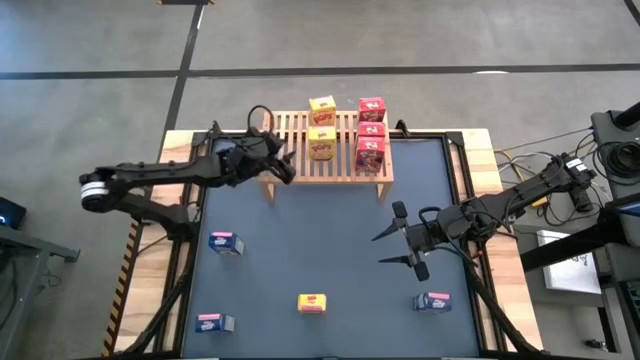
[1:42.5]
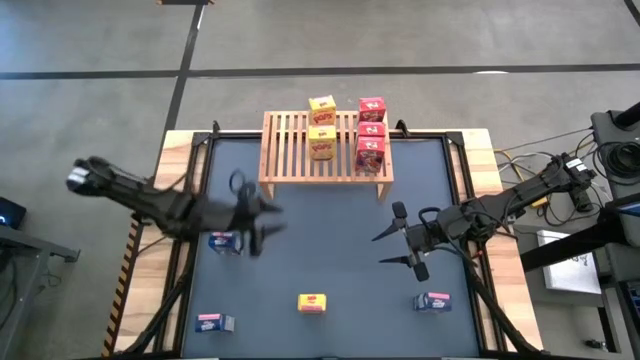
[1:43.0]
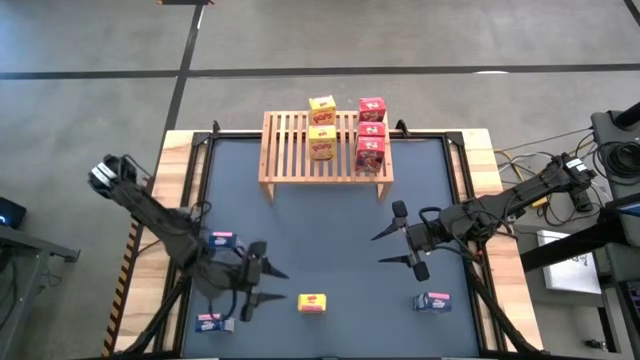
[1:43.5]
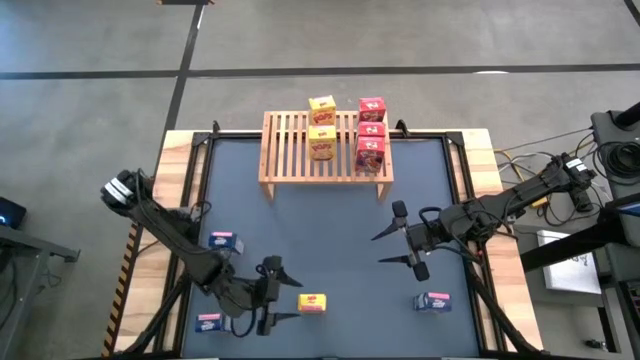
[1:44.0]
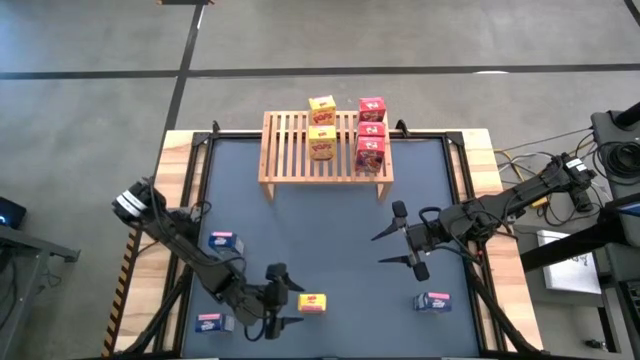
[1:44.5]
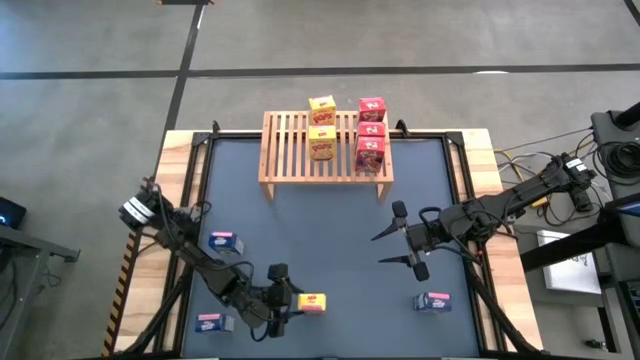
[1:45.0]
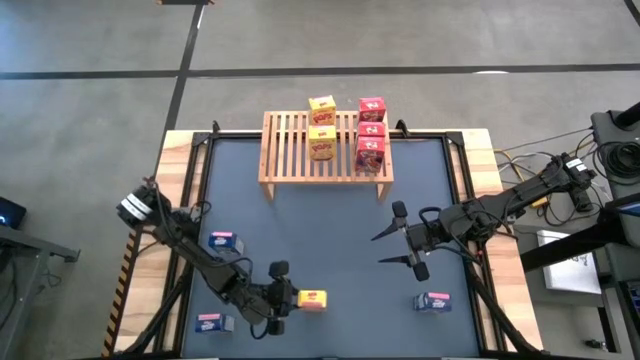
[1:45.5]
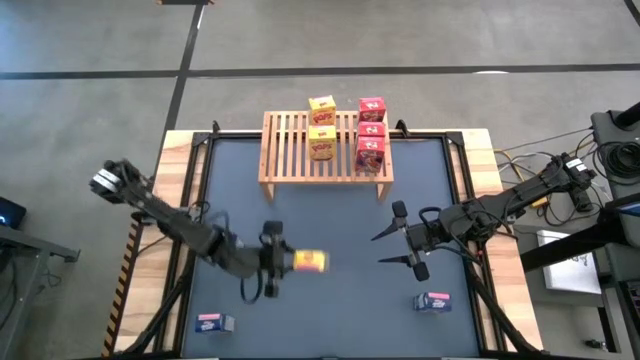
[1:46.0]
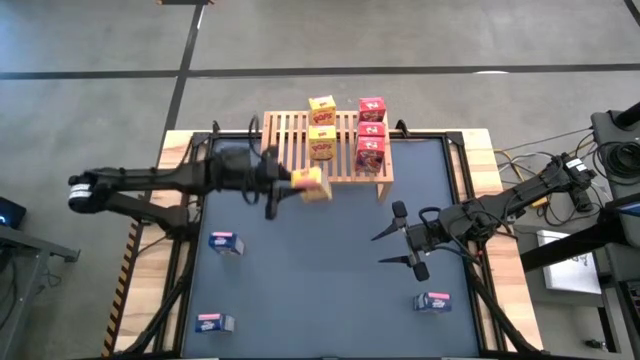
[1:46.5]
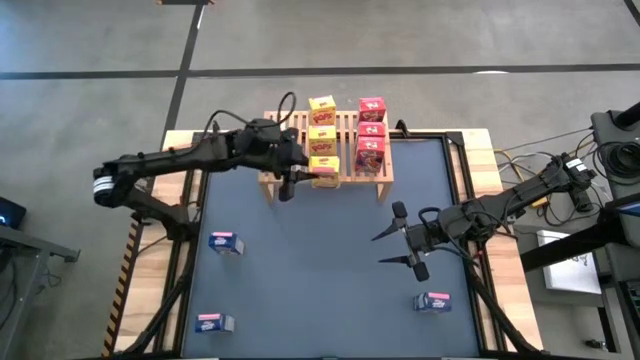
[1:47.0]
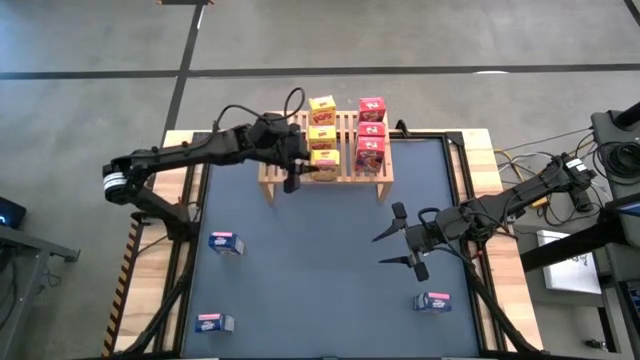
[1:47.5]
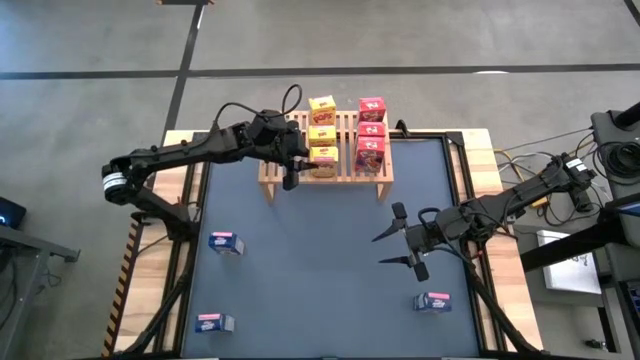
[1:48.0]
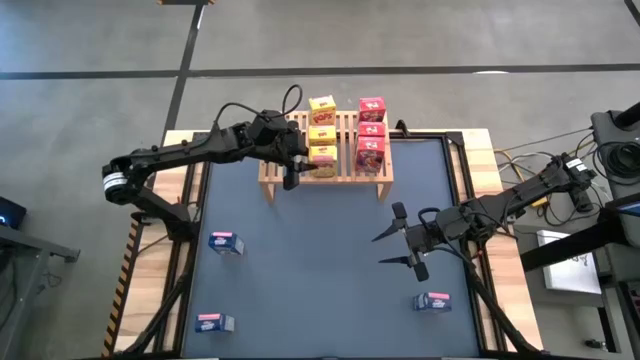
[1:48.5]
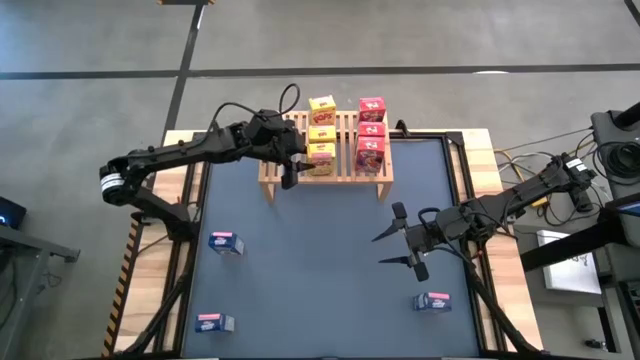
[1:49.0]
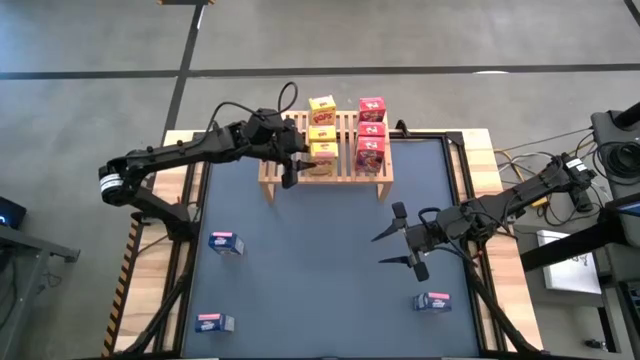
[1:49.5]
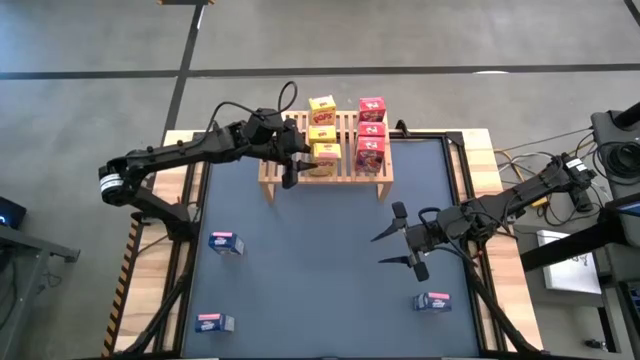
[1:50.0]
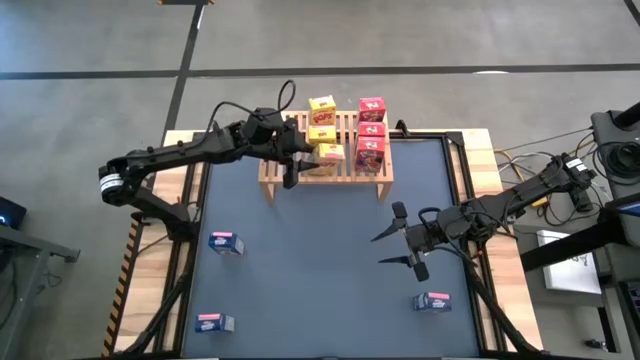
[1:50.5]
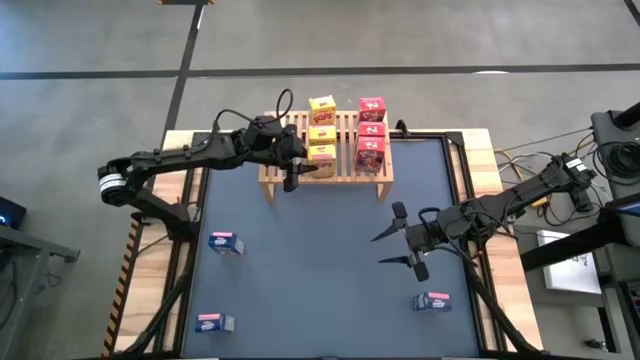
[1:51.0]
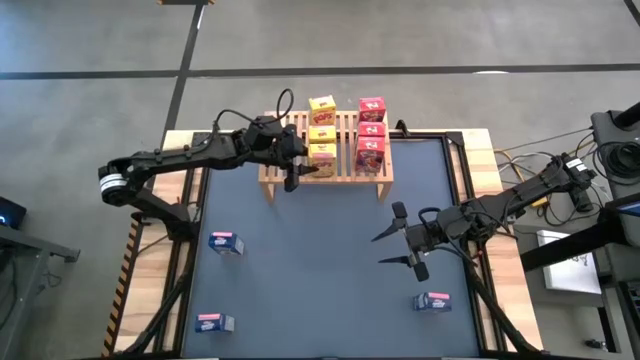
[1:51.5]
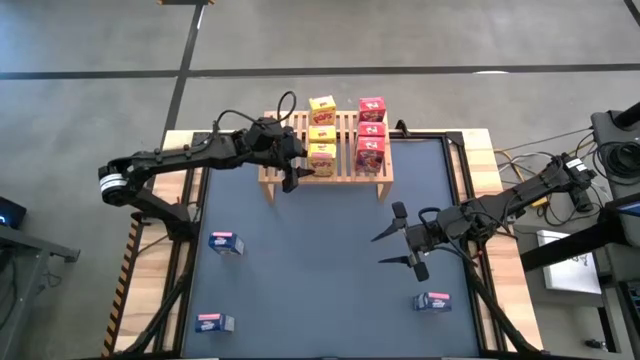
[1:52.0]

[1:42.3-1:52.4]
Task: Stack cereal on shelf
Put the yellow cereal box on the shelf aligned with the yellow cereal boxes

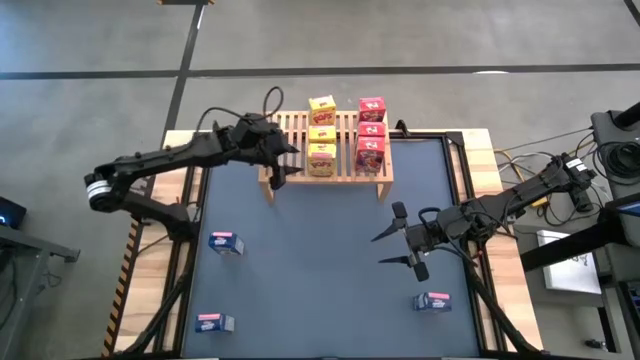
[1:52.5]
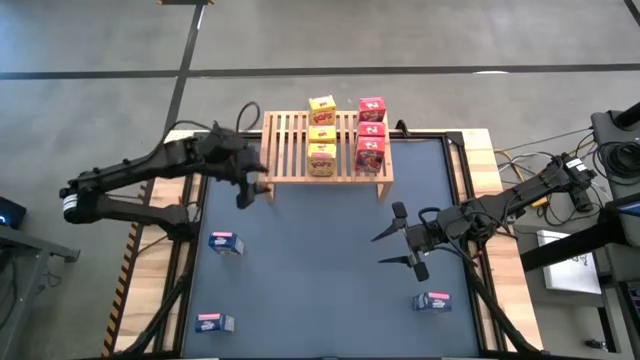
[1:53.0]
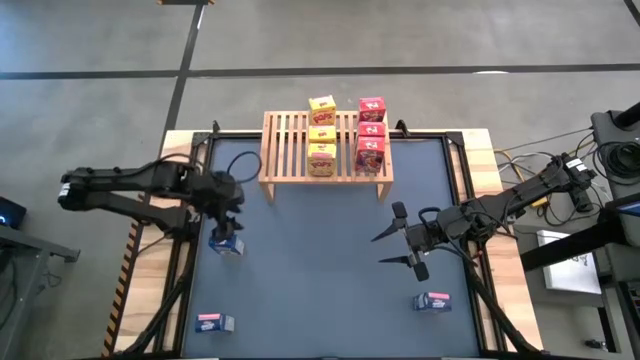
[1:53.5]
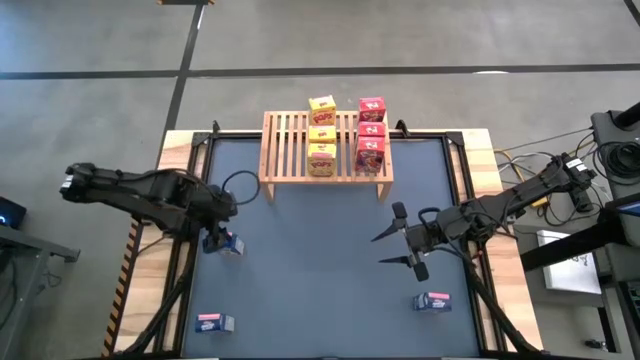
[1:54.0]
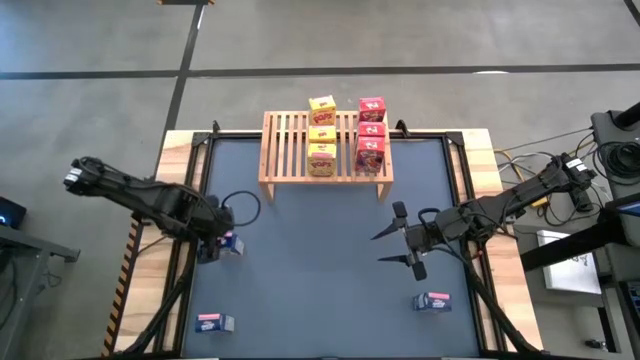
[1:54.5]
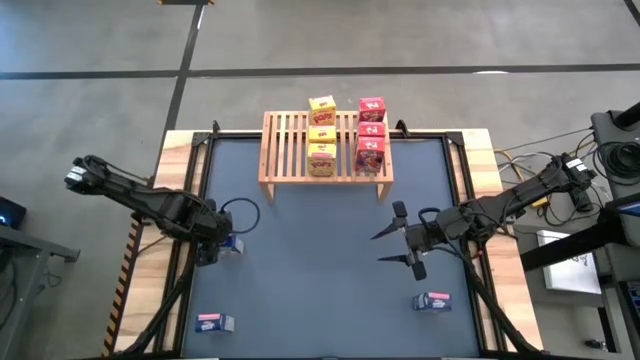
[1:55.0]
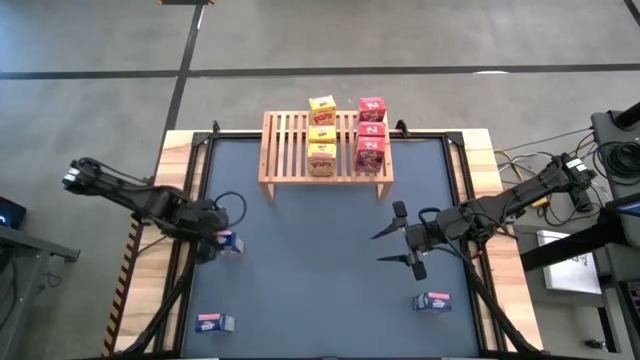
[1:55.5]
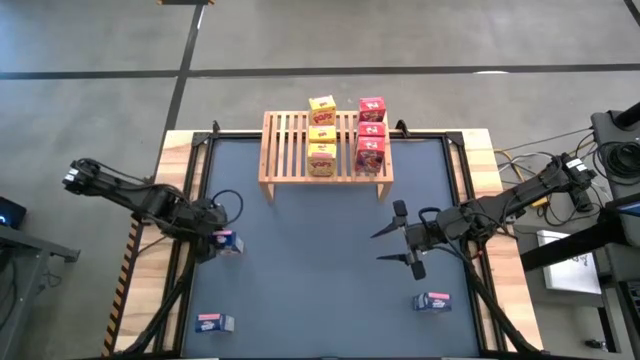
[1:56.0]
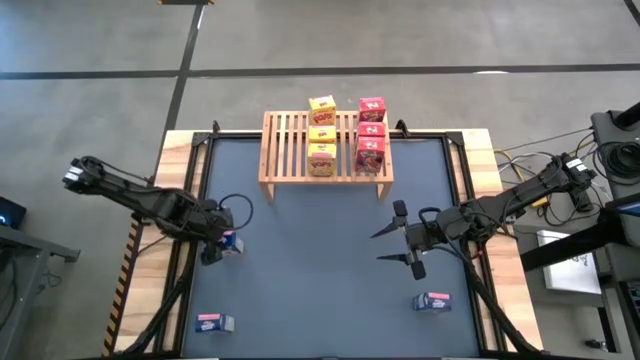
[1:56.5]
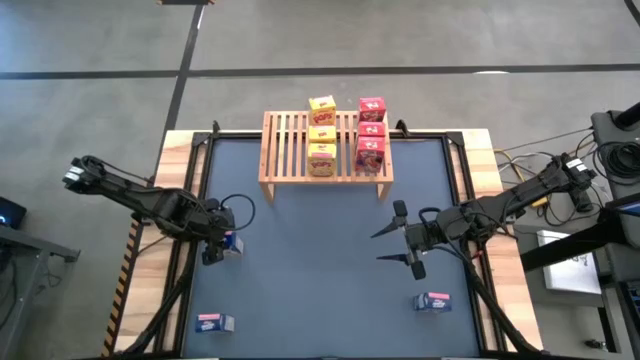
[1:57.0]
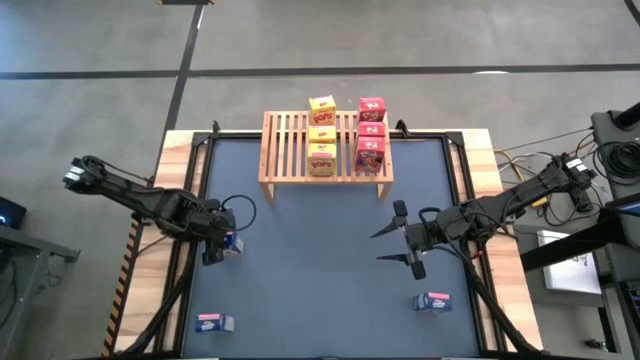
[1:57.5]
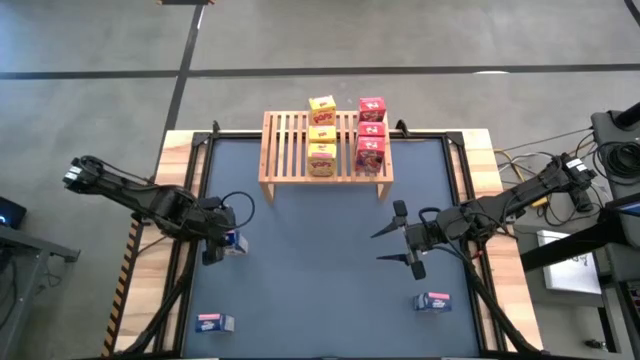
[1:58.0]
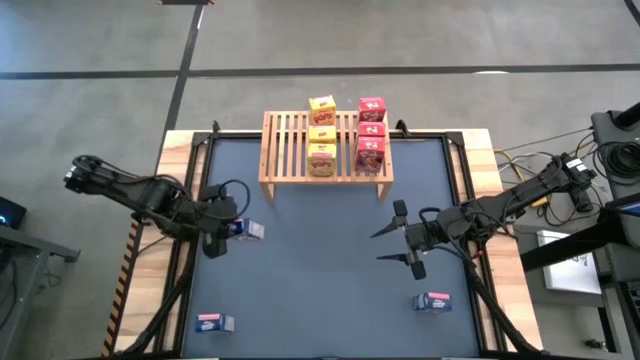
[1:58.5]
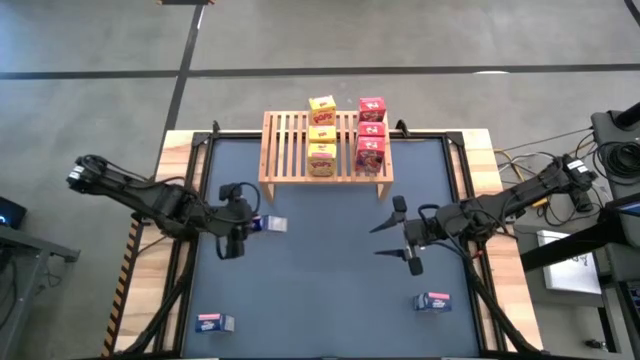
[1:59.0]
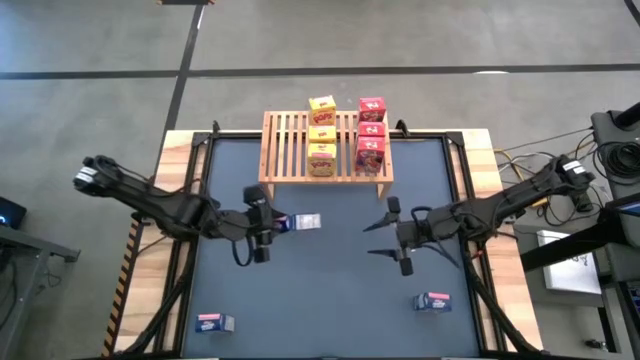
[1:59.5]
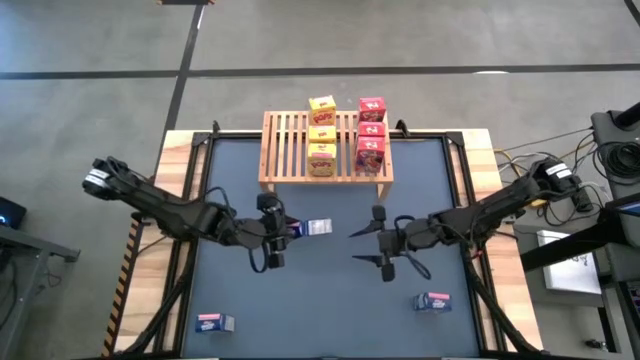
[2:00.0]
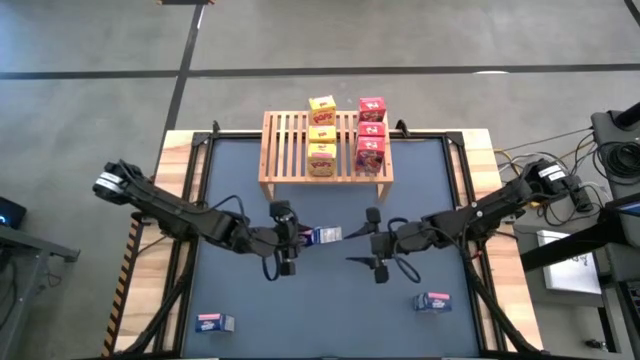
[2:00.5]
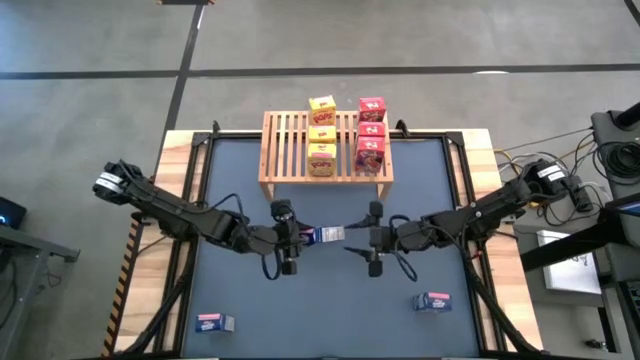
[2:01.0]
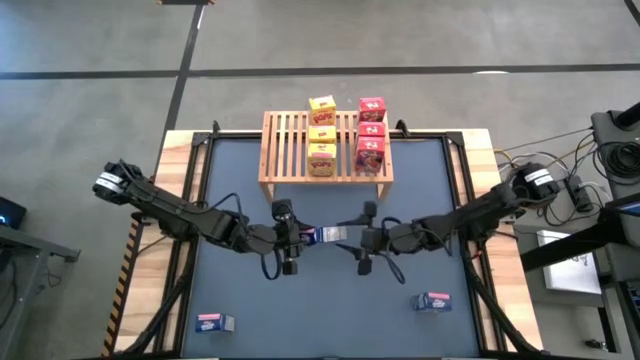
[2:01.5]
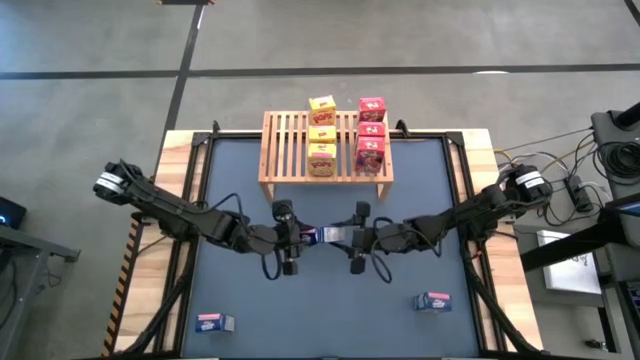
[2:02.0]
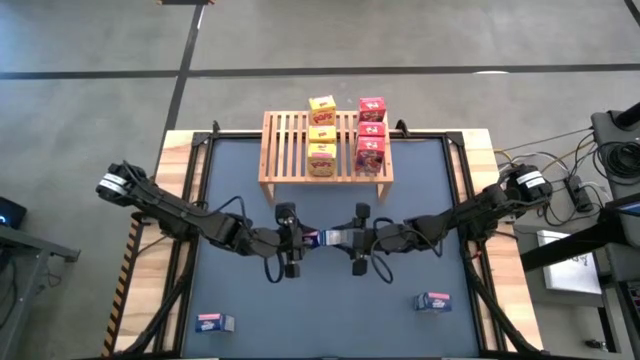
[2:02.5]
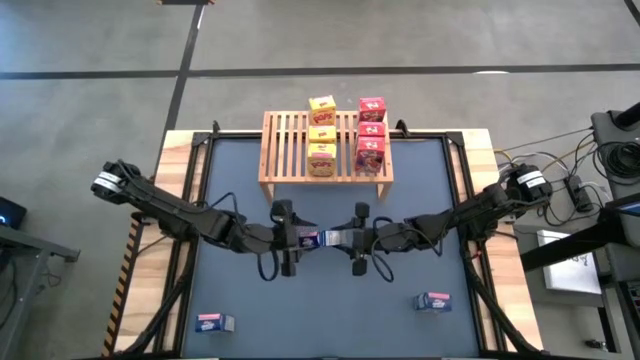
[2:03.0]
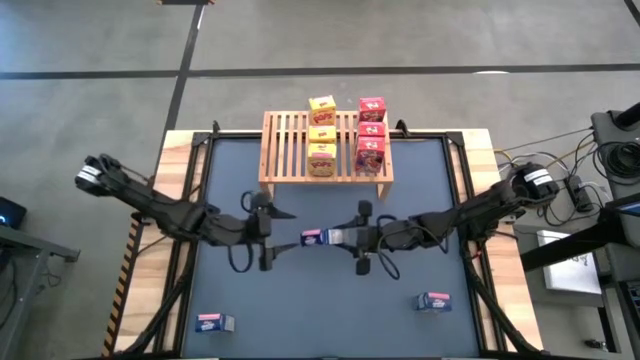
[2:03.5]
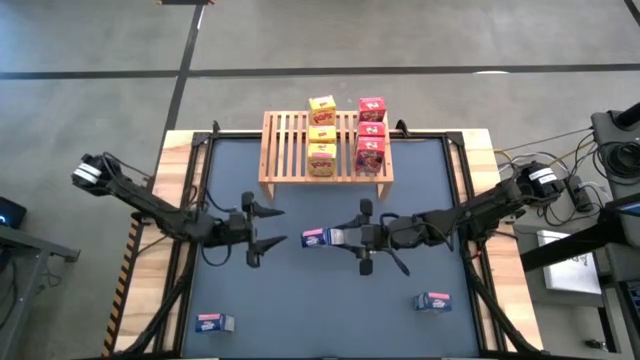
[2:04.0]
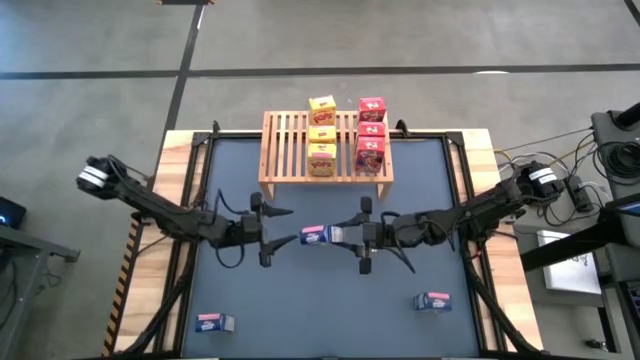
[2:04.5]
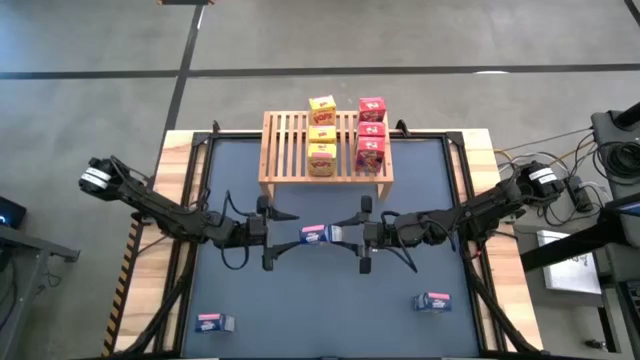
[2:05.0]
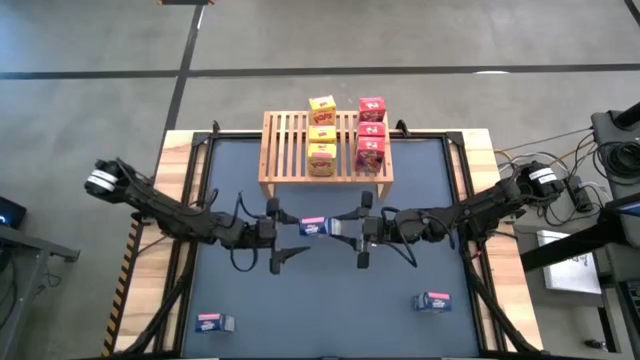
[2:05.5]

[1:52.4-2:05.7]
Put the top blue cereal box on the shelf
